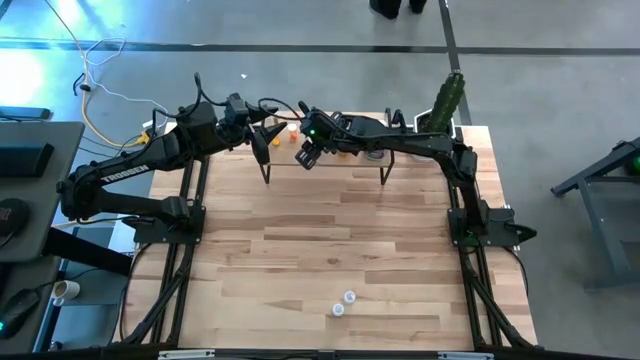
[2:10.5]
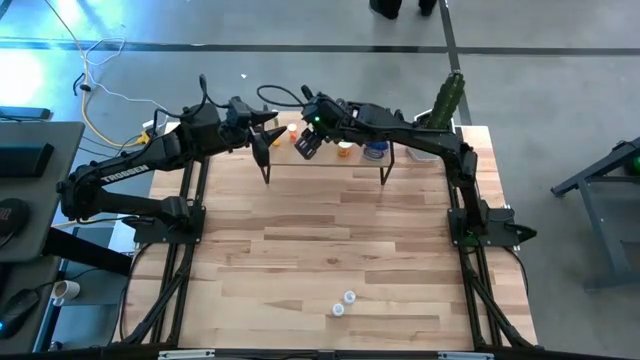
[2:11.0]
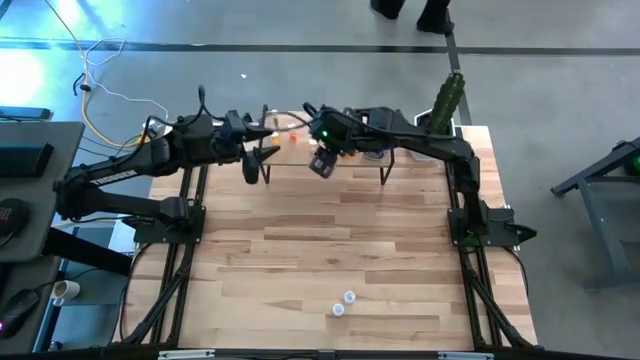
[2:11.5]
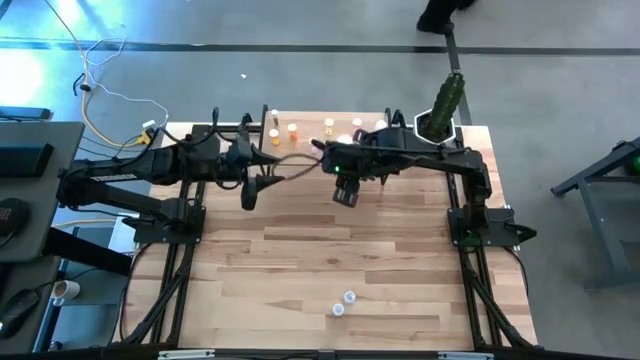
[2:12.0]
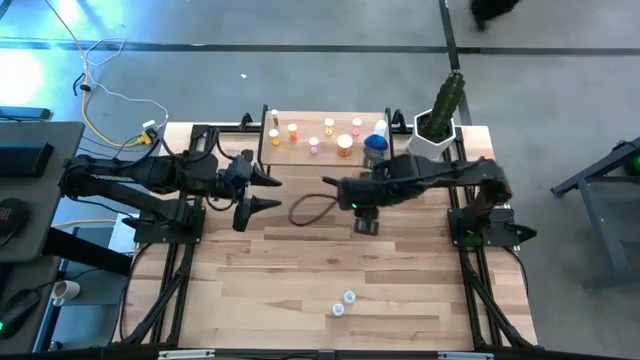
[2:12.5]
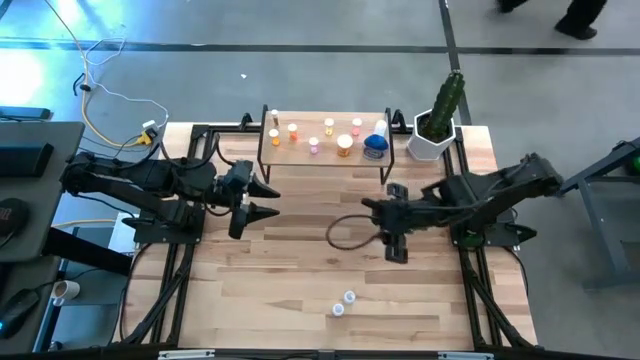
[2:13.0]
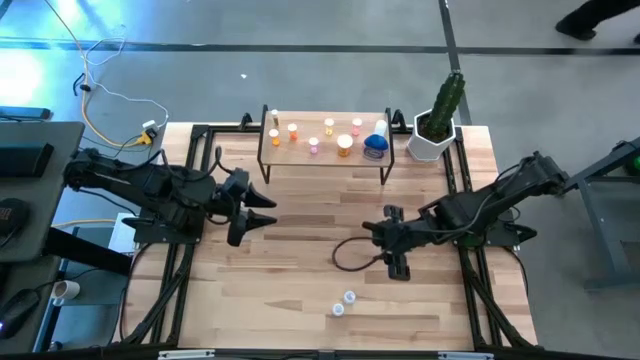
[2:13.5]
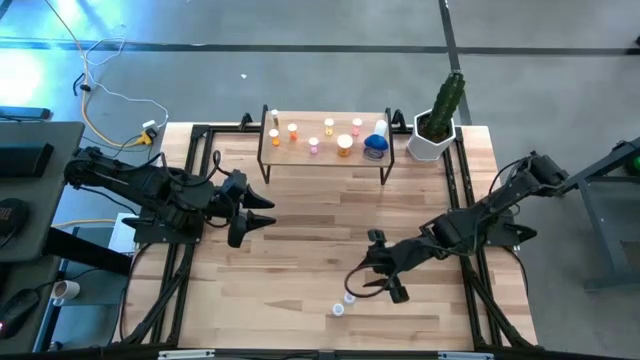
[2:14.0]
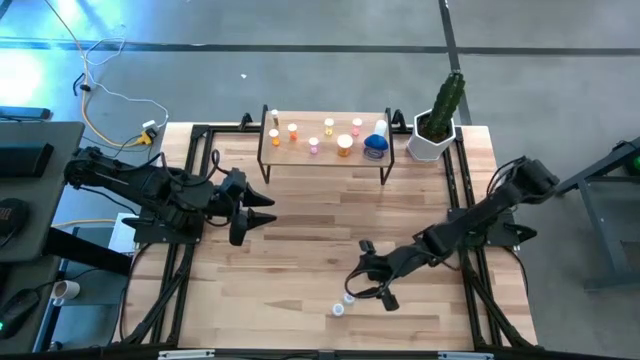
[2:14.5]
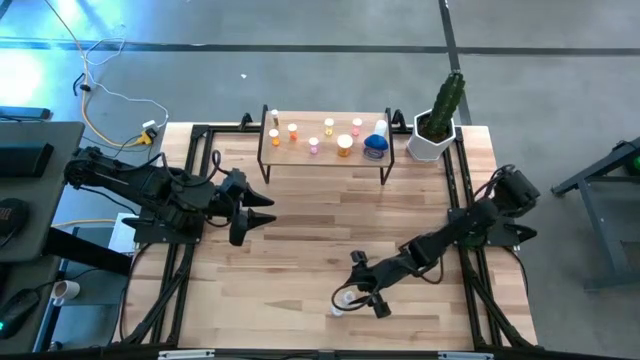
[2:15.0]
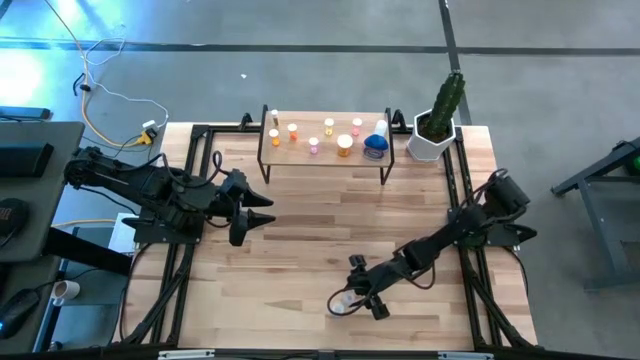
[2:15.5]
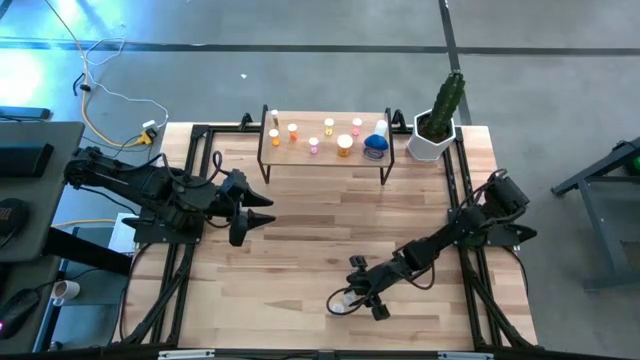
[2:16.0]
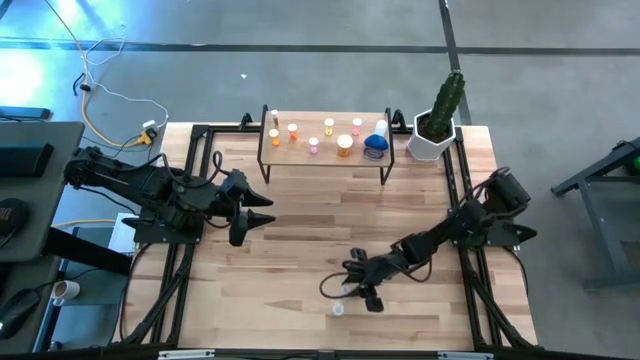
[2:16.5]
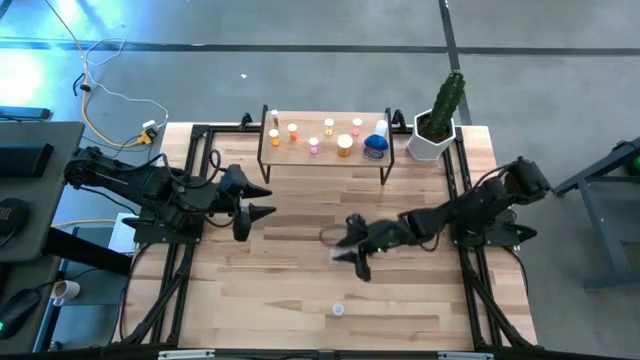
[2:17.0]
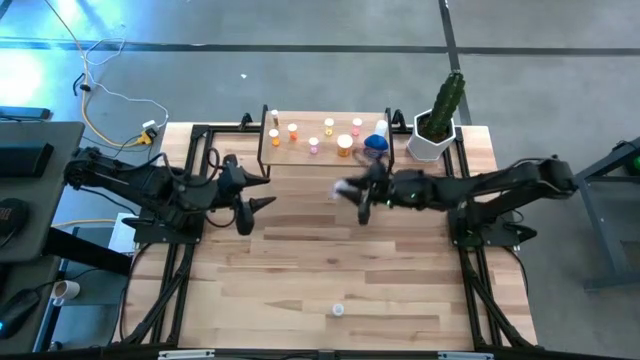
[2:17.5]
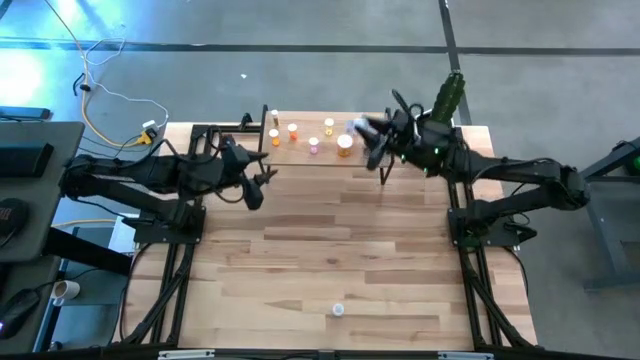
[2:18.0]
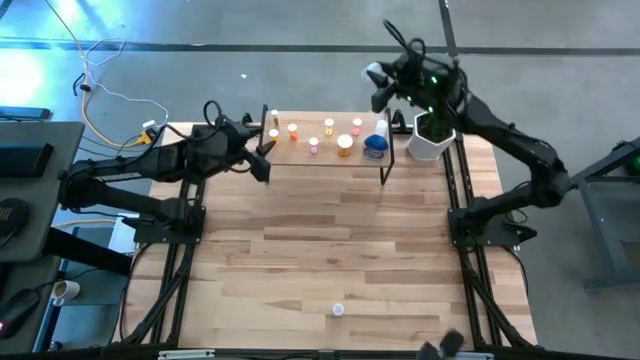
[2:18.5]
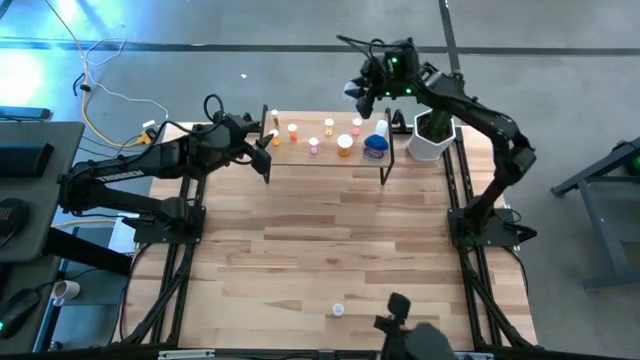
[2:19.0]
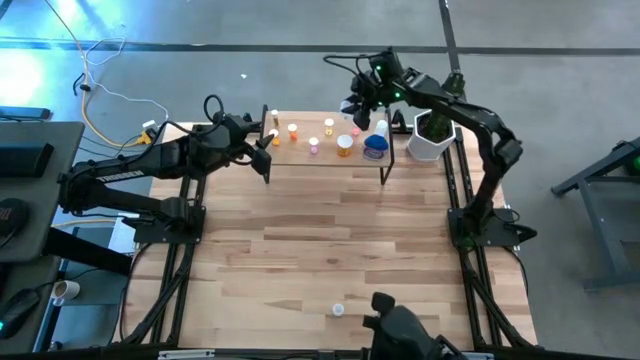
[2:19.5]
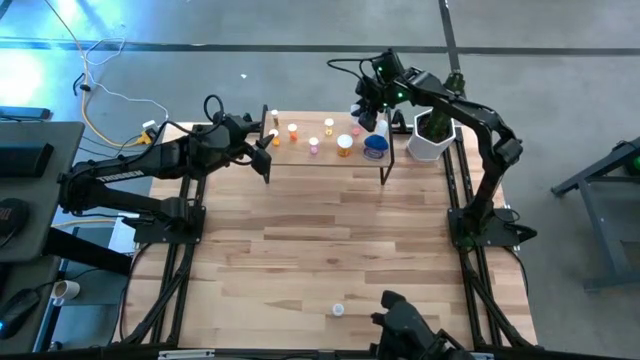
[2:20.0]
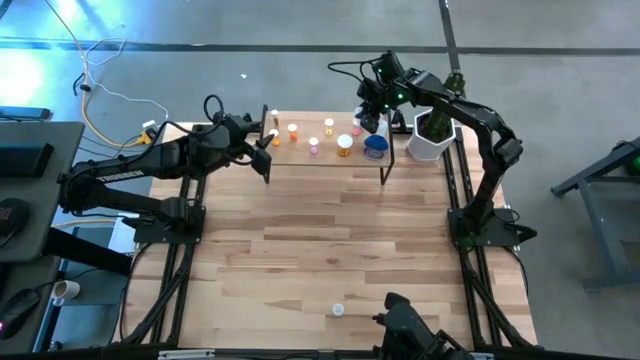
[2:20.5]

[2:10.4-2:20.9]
Task: Pick and place medicine bottles onto shelf by color
Put the top white medicine bottle on the shelf

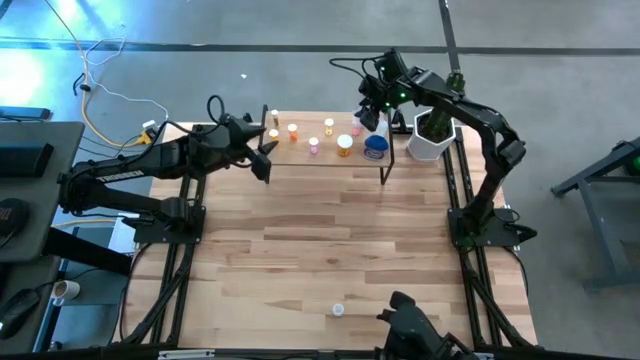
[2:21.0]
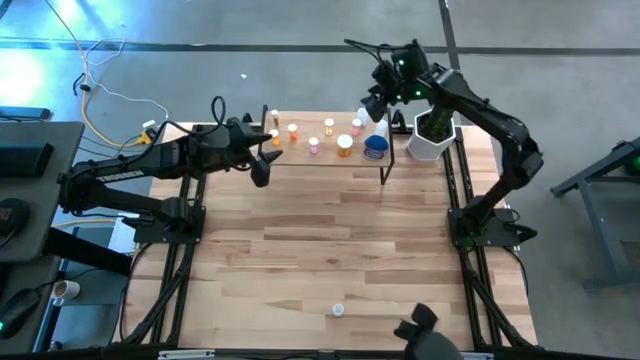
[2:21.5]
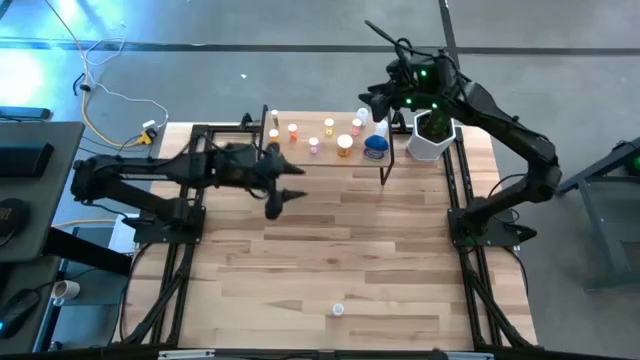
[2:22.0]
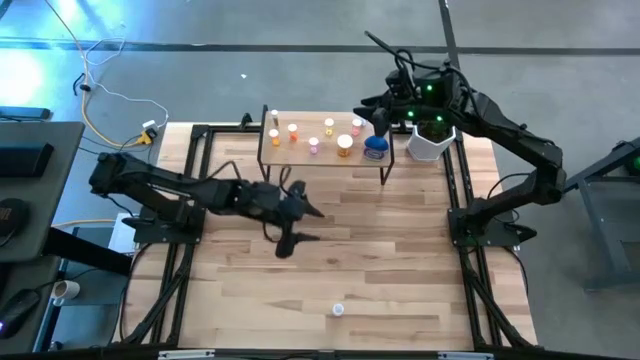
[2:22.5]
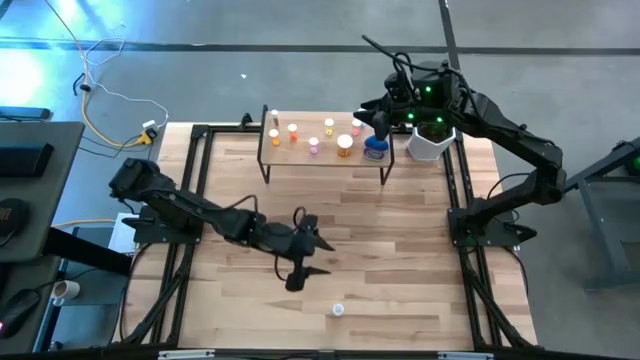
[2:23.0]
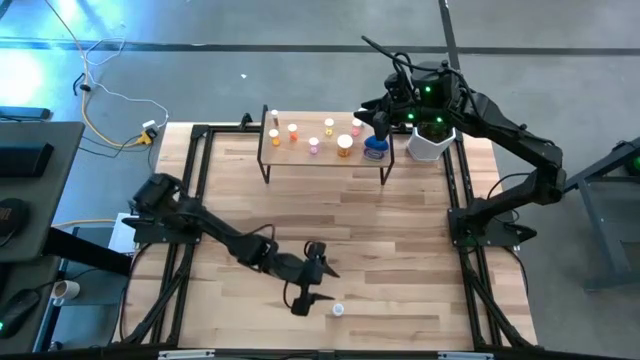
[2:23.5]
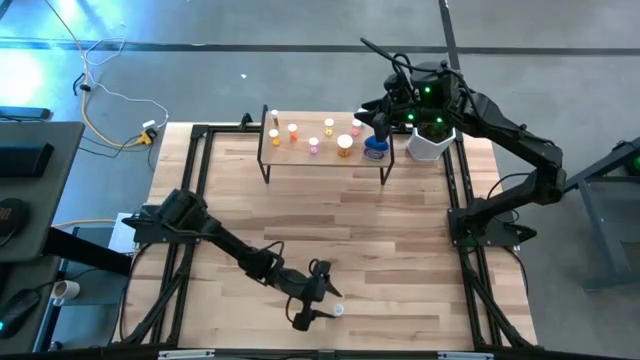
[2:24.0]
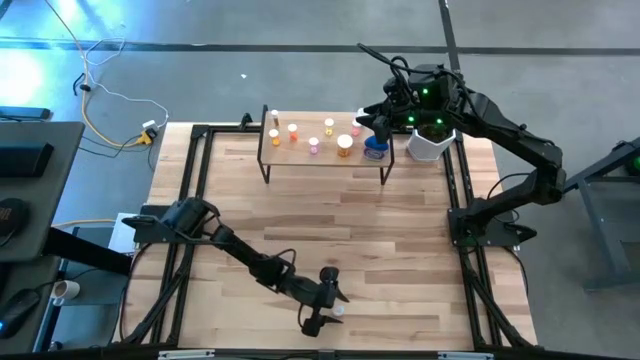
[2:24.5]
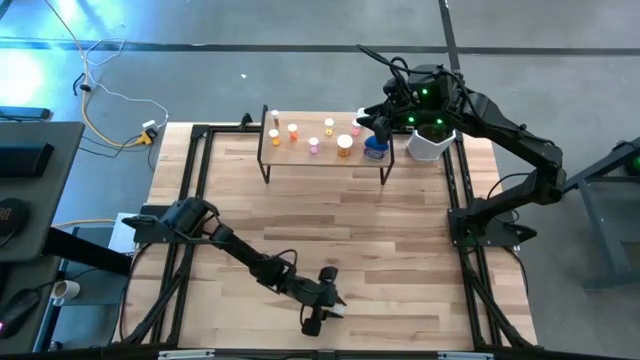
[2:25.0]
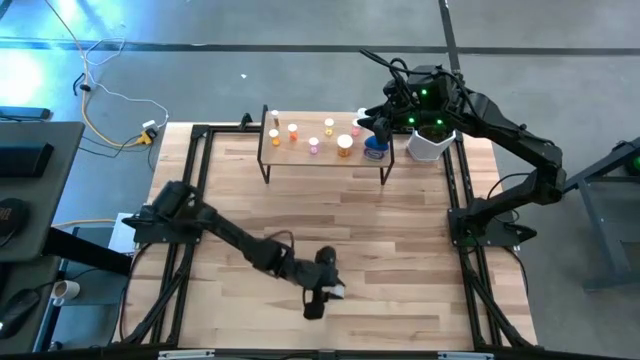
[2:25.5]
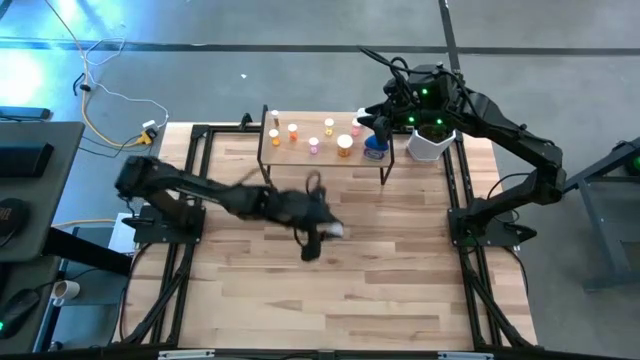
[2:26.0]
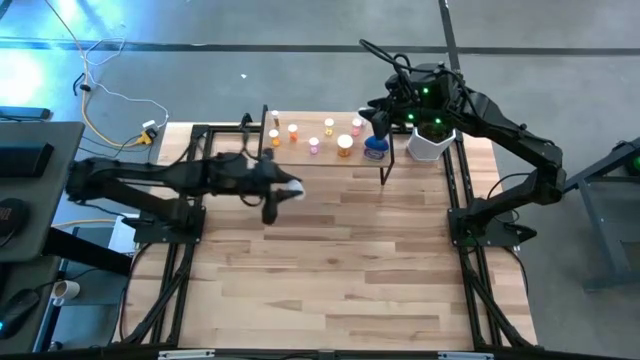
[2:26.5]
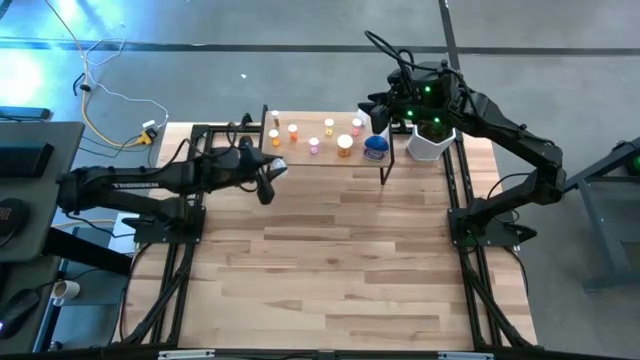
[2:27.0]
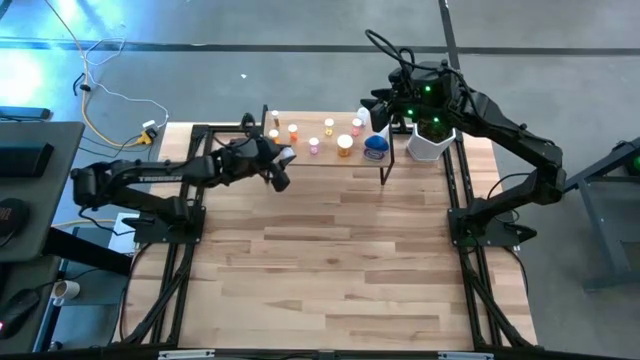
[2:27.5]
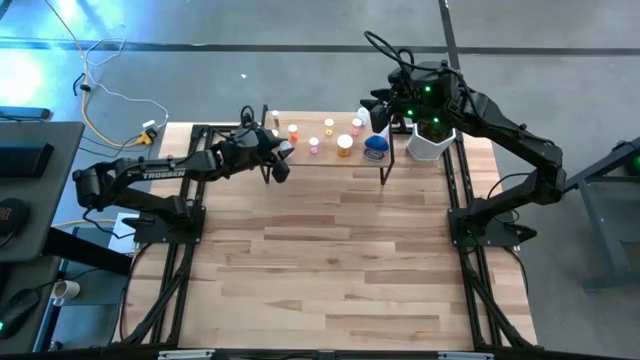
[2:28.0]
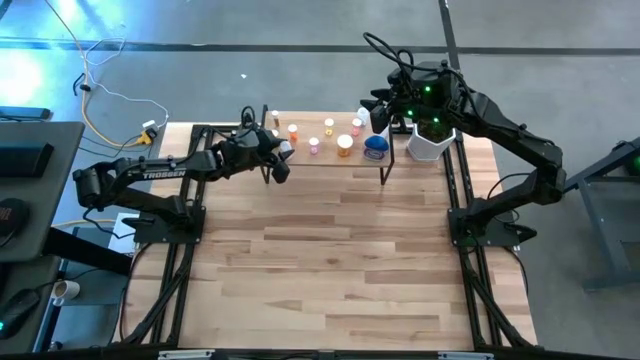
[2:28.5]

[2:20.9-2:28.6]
Put the white medicine bottle on the shelf

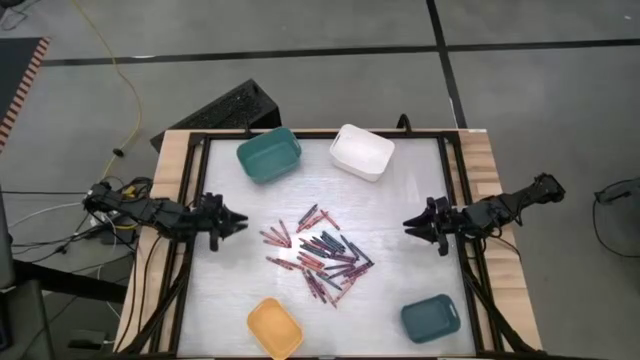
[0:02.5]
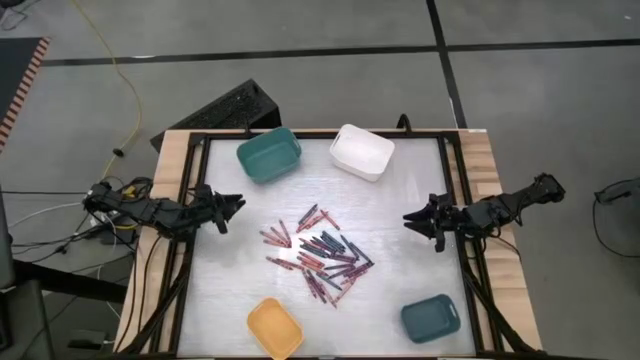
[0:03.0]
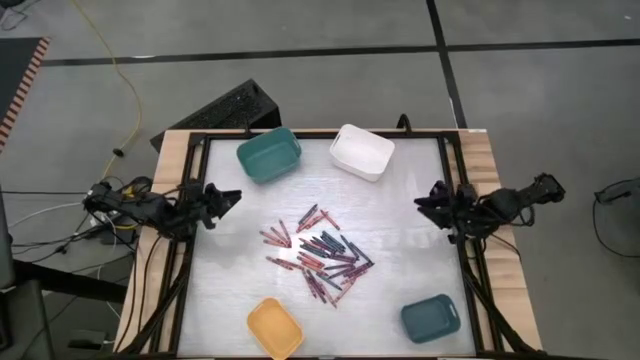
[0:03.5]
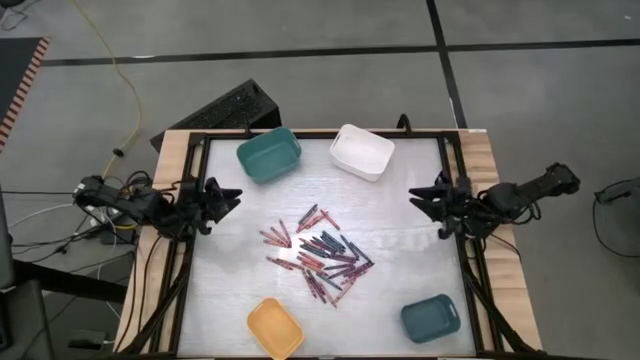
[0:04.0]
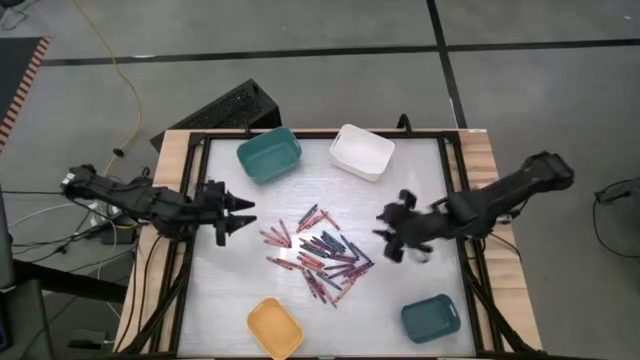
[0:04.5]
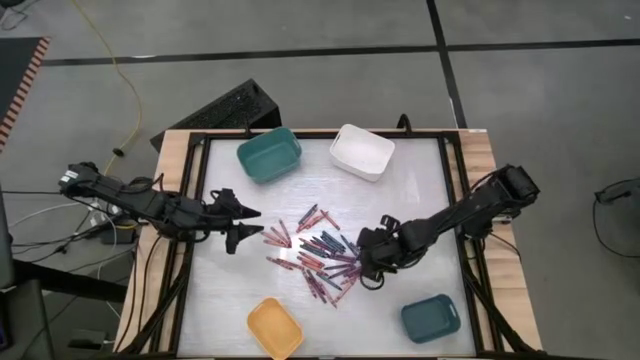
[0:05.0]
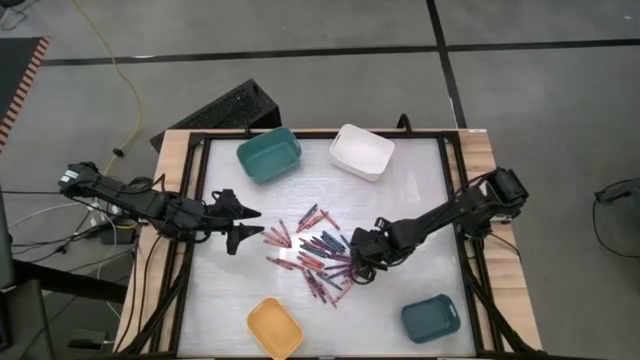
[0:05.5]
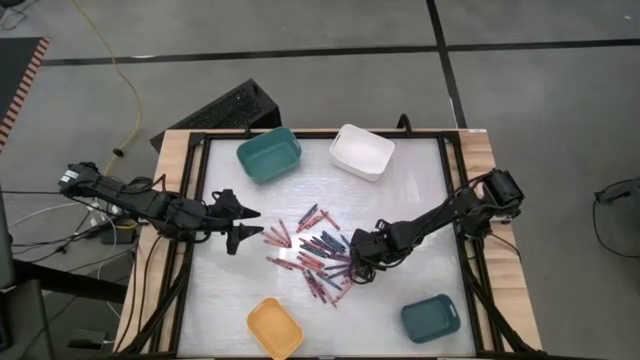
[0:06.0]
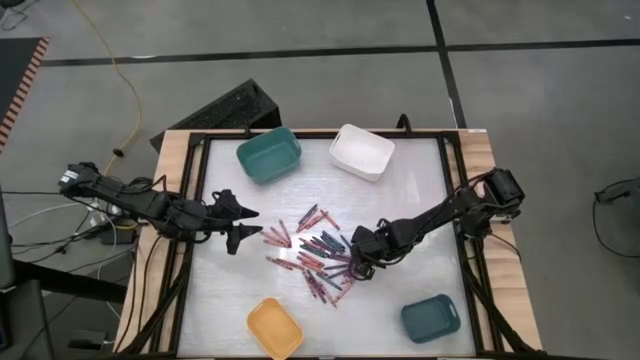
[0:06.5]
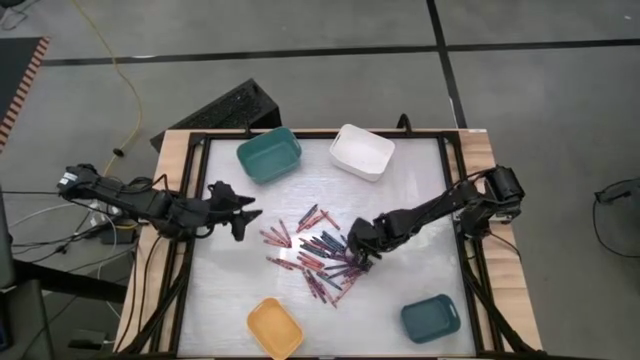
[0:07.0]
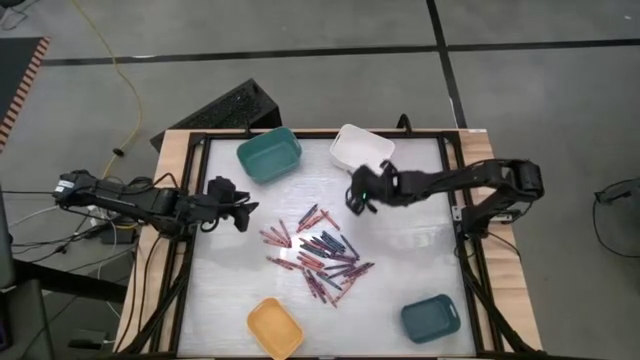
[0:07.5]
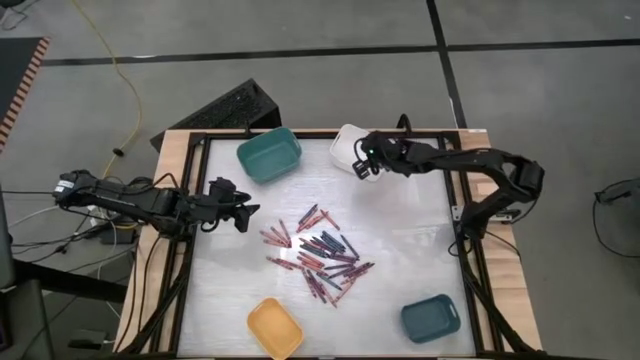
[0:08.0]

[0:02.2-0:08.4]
Task: Sort crayons
Put the blue crayon into the white bin
